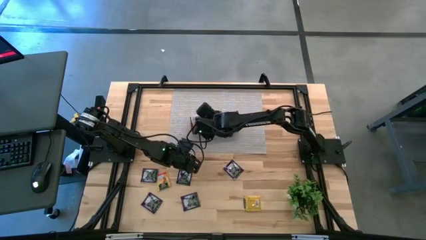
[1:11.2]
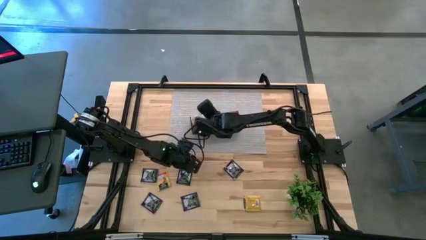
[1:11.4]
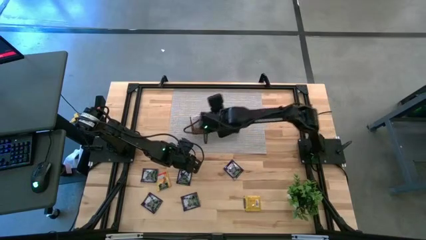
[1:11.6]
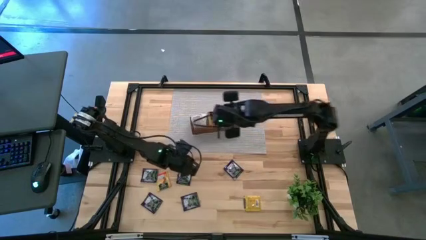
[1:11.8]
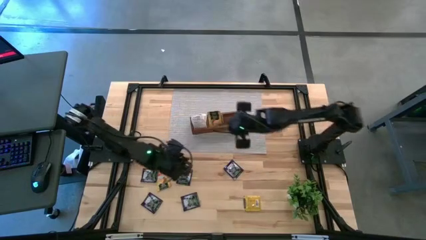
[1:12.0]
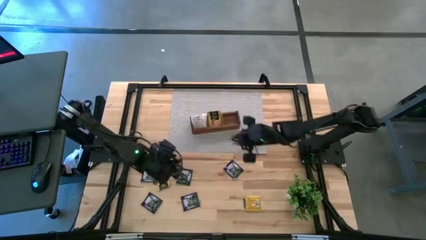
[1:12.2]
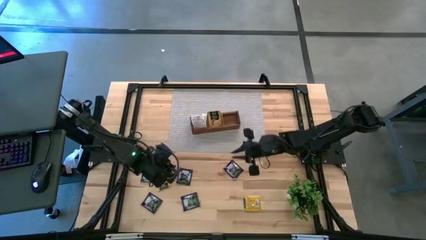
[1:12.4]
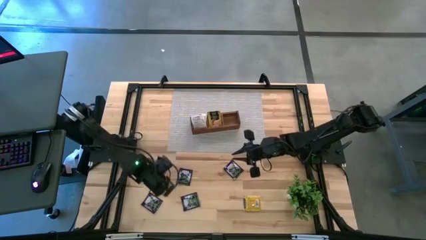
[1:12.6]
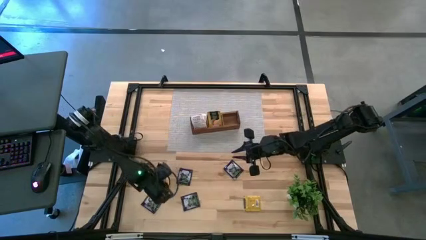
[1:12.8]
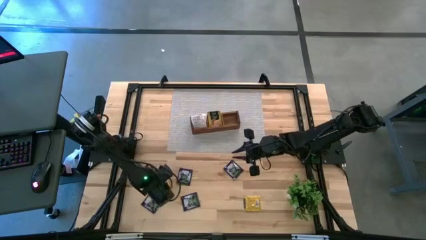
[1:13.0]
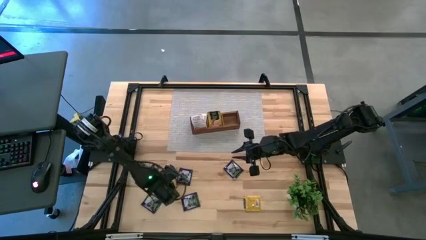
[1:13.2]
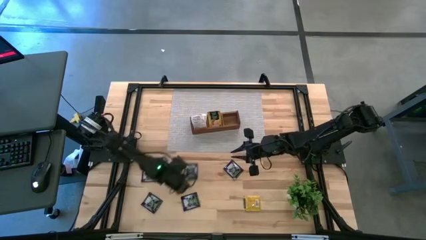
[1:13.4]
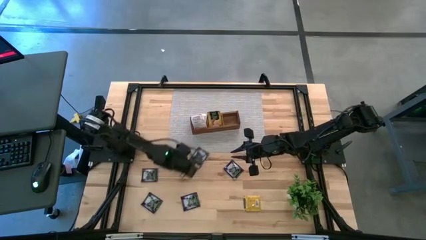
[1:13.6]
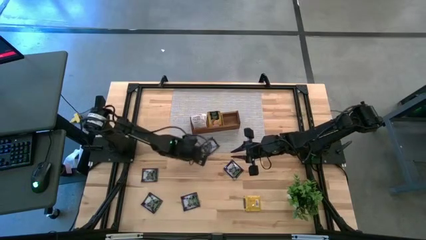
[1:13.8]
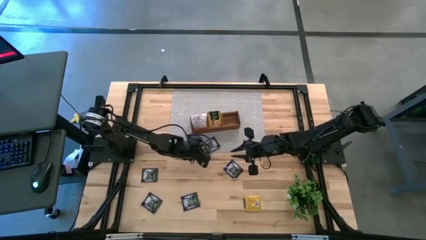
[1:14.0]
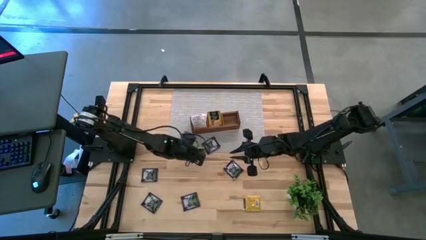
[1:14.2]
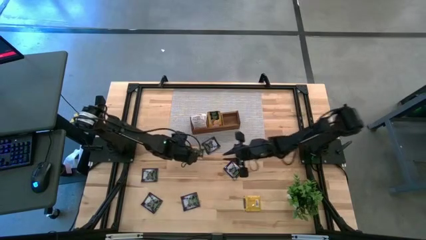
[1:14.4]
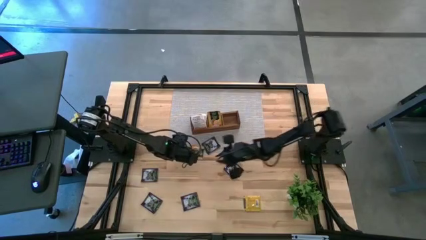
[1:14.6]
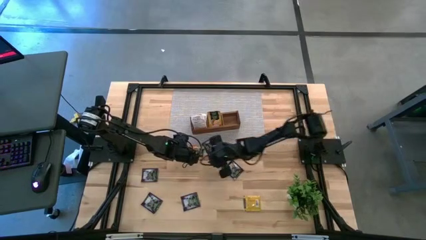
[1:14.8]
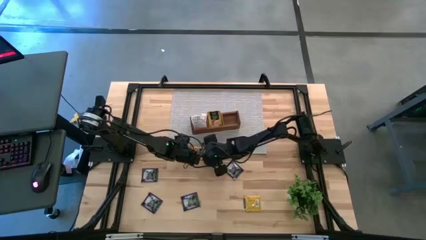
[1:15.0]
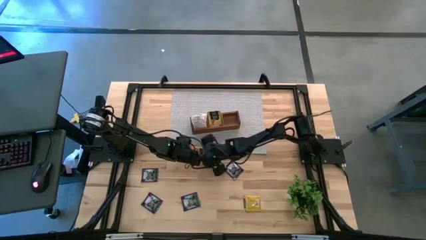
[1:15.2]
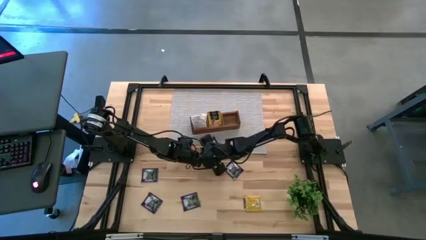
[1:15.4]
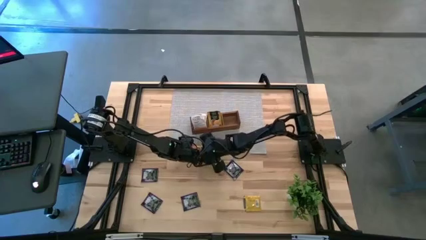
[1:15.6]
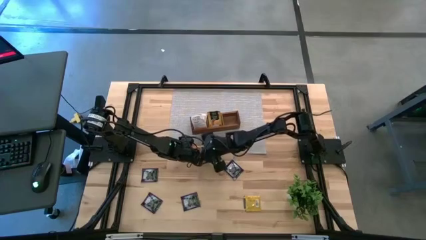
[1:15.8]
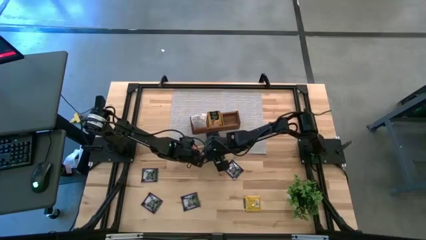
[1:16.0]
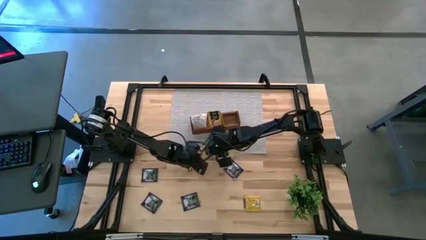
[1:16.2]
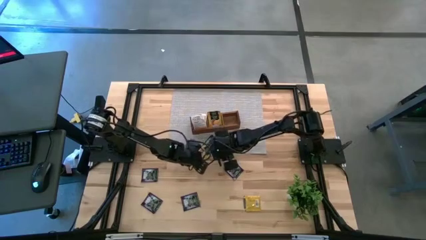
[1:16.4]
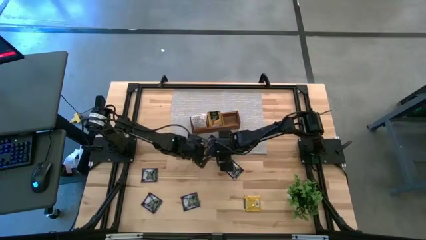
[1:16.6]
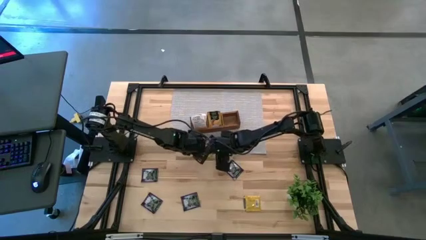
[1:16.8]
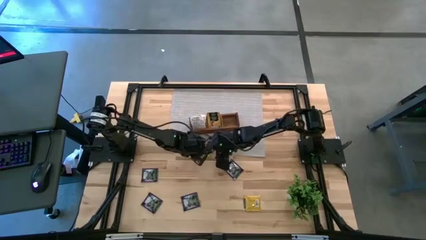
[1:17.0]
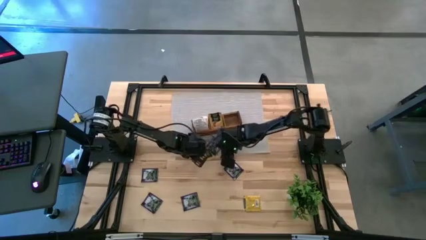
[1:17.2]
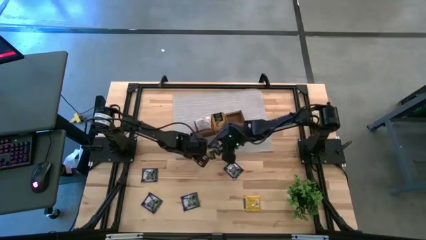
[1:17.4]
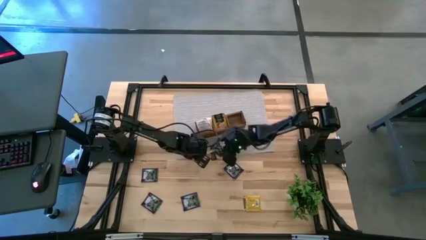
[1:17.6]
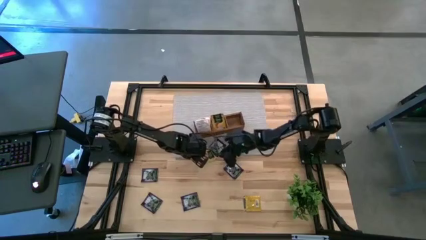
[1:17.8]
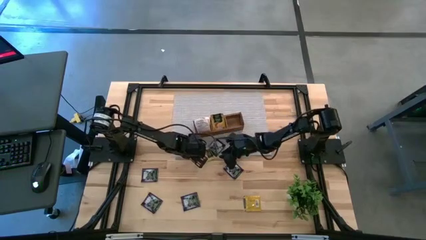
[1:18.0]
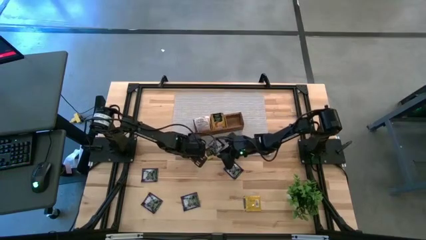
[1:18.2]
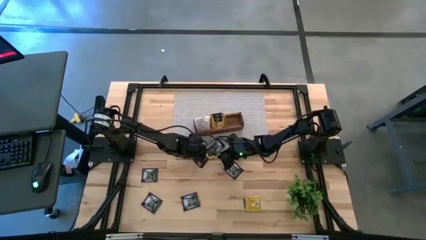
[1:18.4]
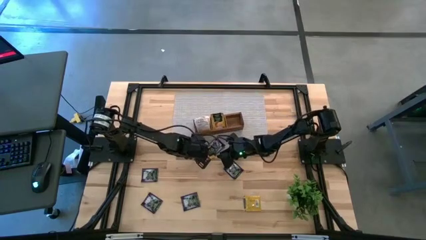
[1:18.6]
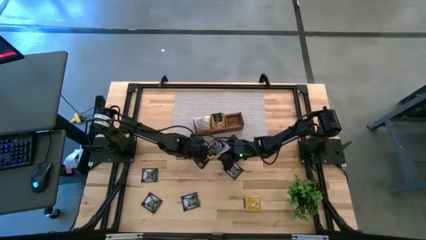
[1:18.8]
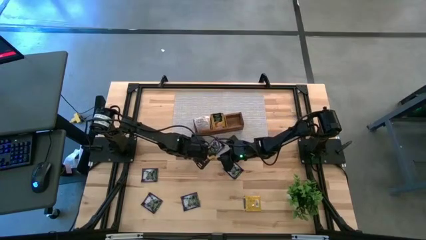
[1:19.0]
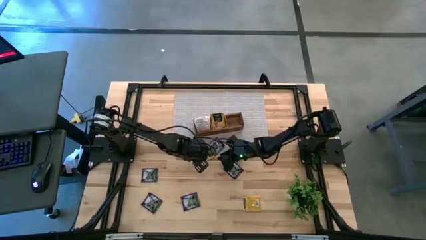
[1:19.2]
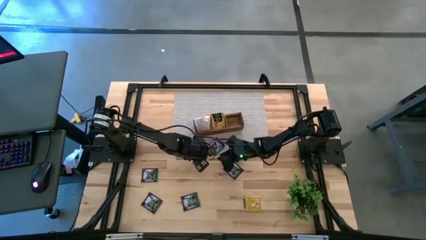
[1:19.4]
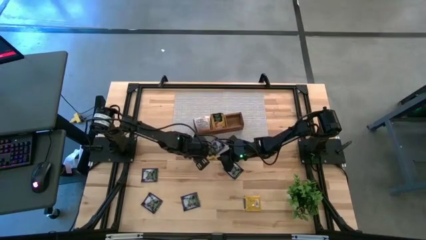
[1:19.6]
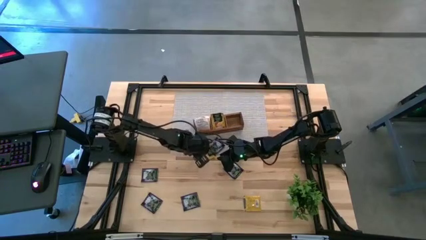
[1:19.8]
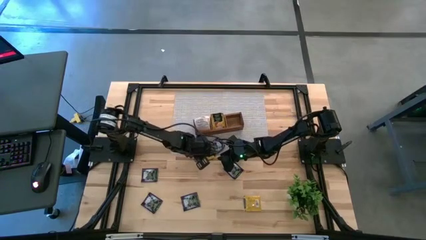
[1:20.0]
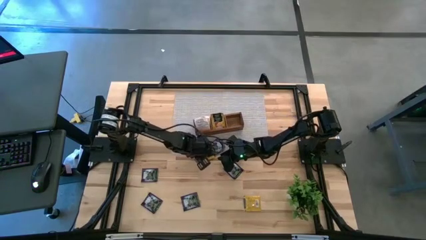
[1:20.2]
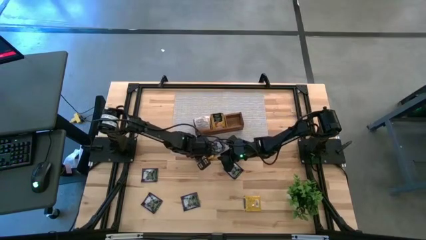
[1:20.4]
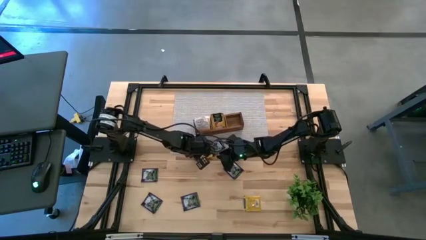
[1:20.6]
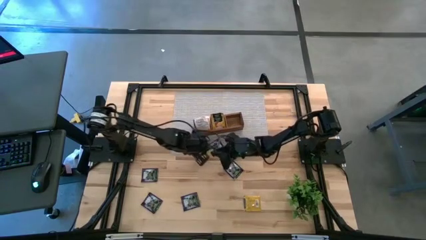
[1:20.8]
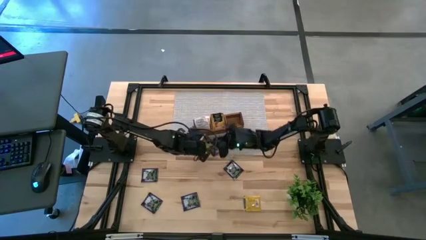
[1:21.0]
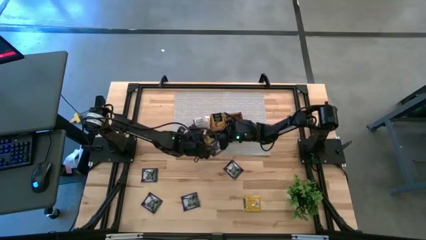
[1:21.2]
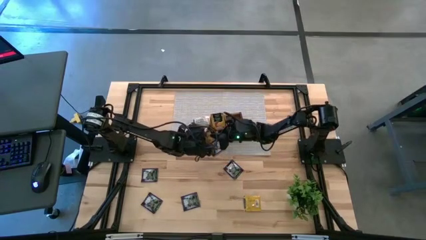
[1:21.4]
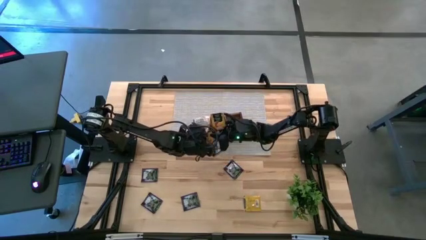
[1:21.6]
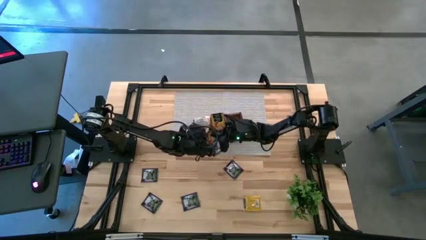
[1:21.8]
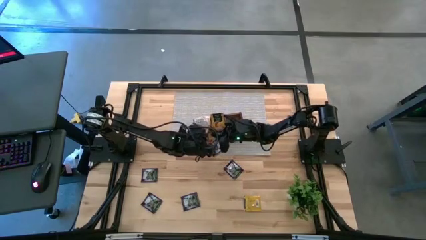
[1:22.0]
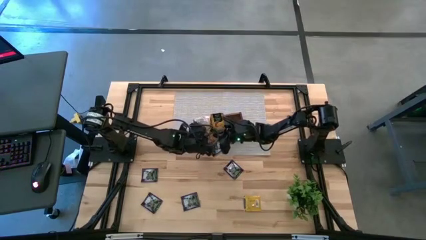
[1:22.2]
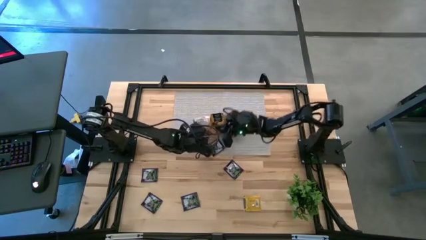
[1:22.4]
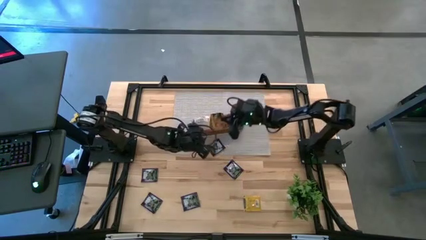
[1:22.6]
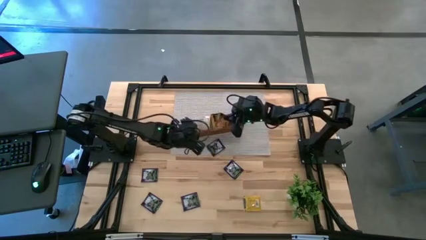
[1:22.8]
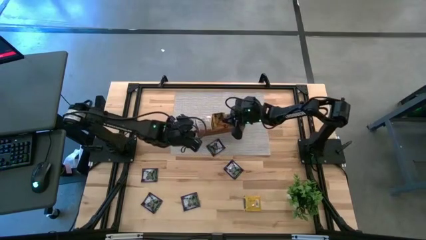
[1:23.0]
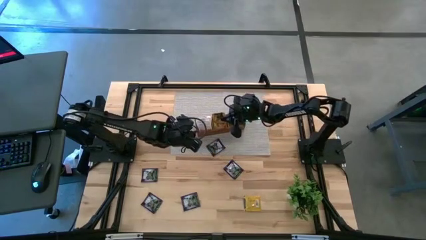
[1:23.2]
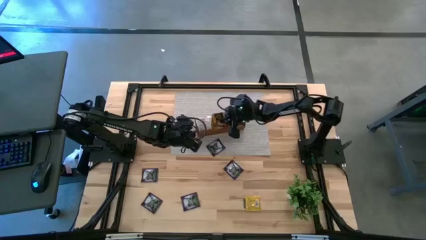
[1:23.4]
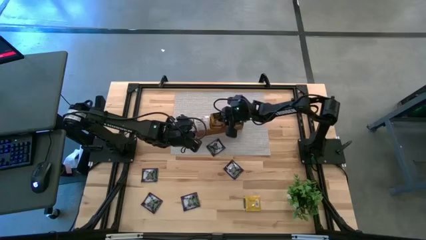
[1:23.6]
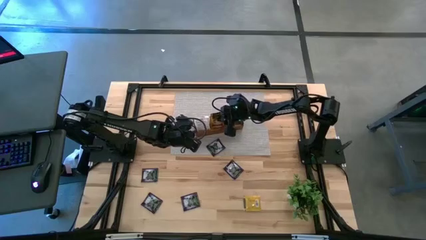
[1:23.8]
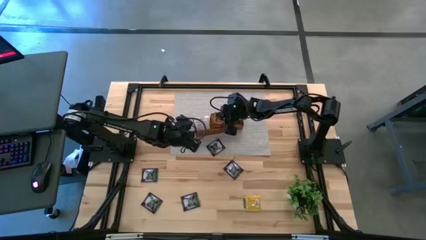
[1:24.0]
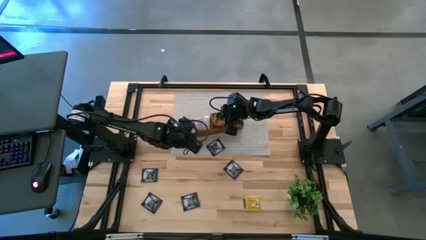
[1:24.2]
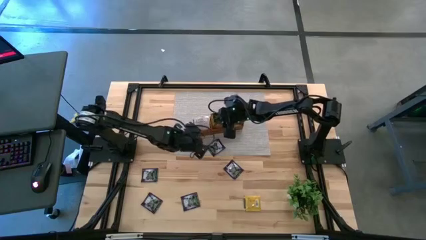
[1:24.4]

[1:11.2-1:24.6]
Task: Pick & Place Tea
Put the yellow tea bag into the middle section of the wooden organizer

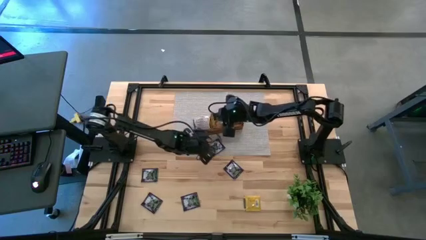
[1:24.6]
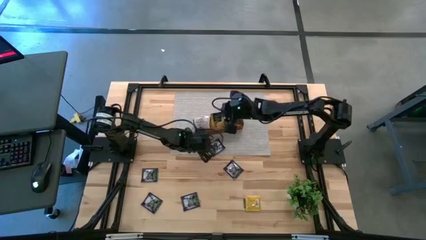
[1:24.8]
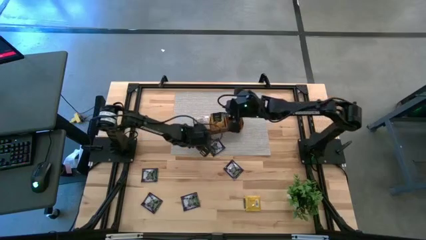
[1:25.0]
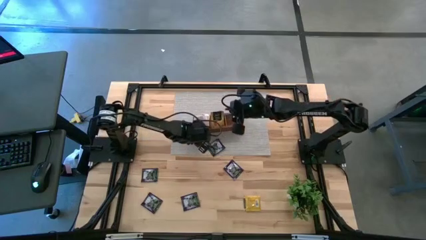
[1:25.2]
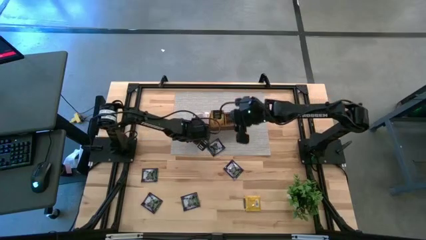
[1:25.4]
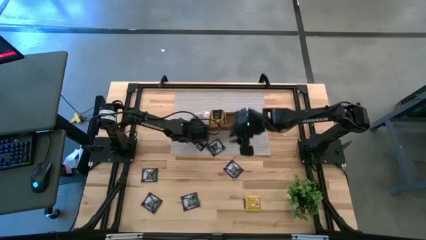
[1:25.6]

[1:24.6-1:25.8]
Adjust the wooden organizer
